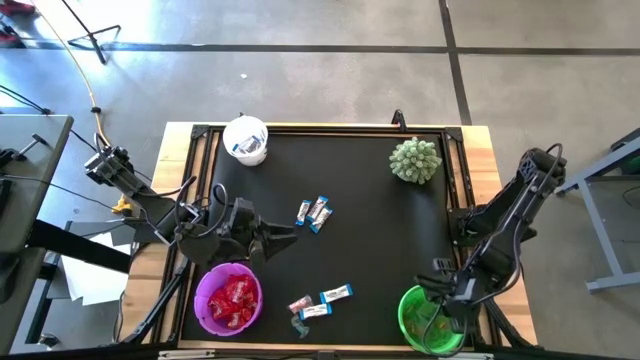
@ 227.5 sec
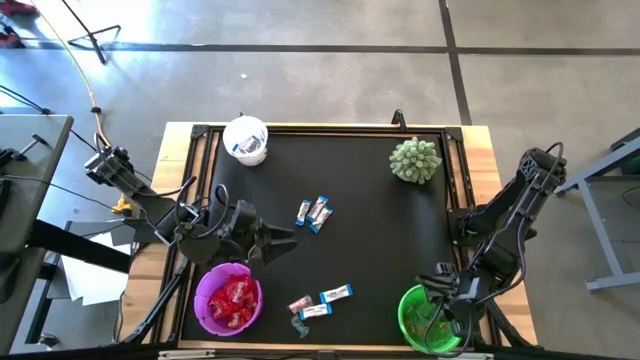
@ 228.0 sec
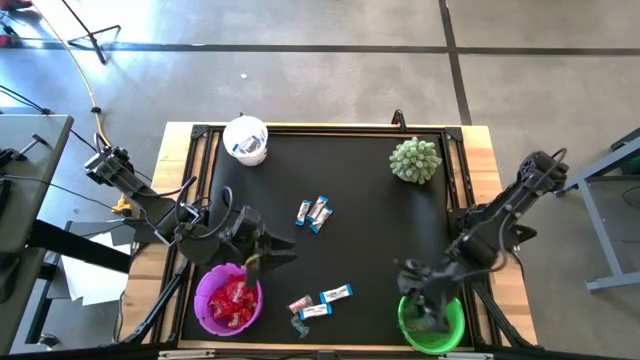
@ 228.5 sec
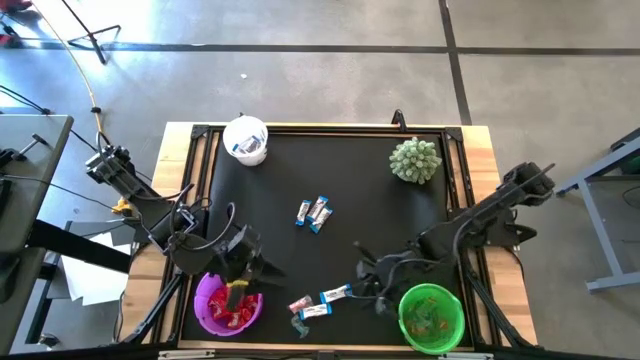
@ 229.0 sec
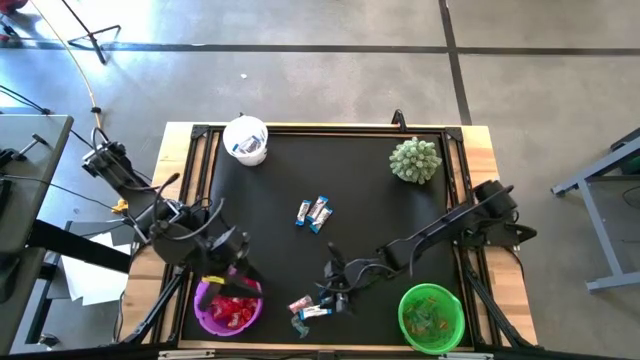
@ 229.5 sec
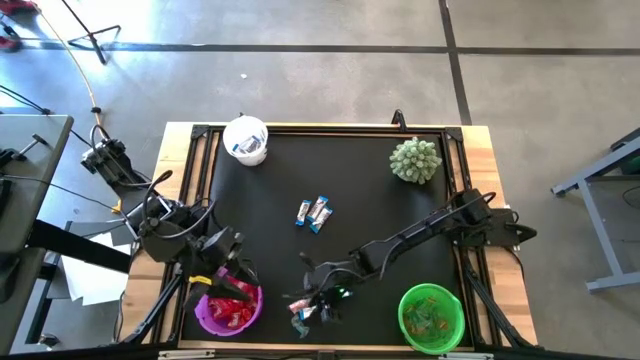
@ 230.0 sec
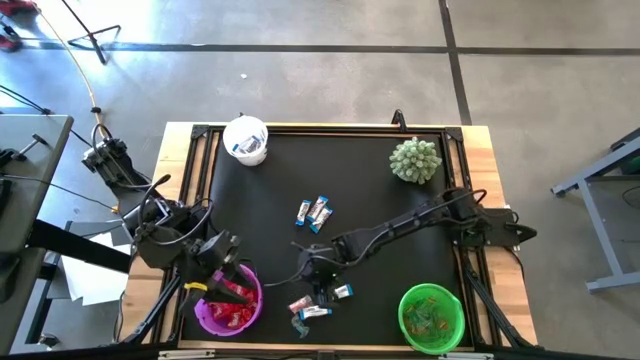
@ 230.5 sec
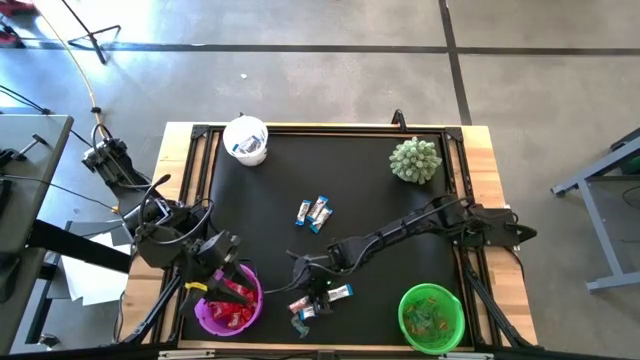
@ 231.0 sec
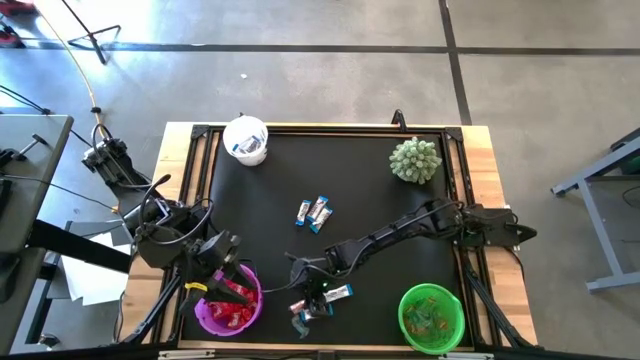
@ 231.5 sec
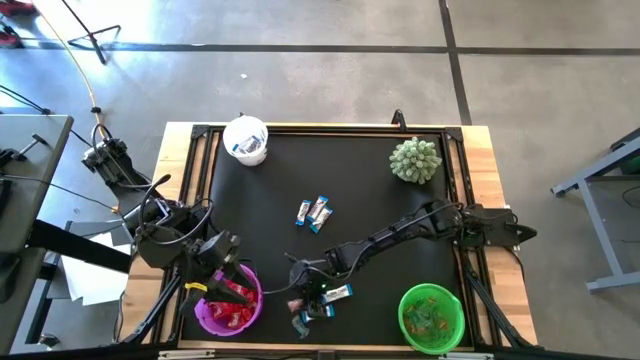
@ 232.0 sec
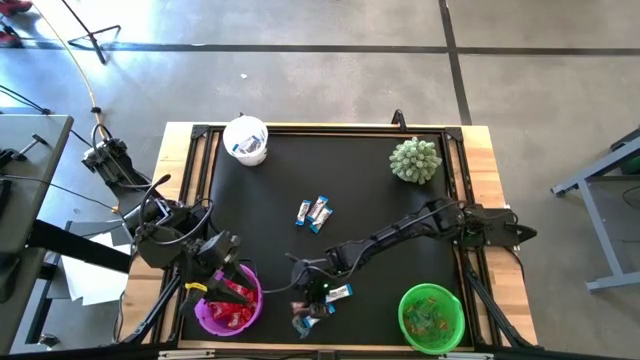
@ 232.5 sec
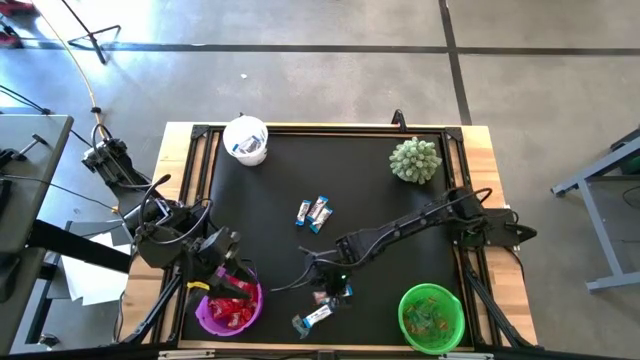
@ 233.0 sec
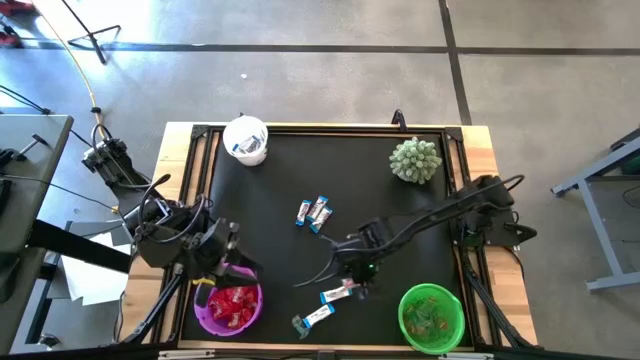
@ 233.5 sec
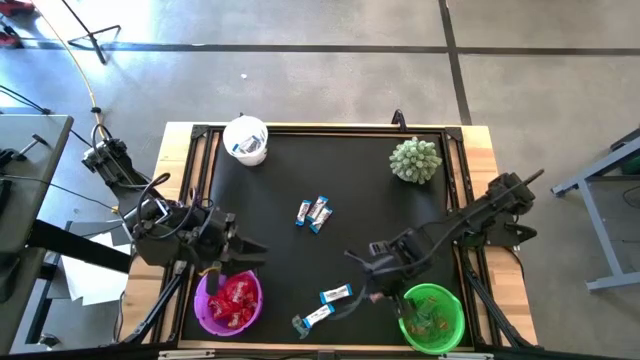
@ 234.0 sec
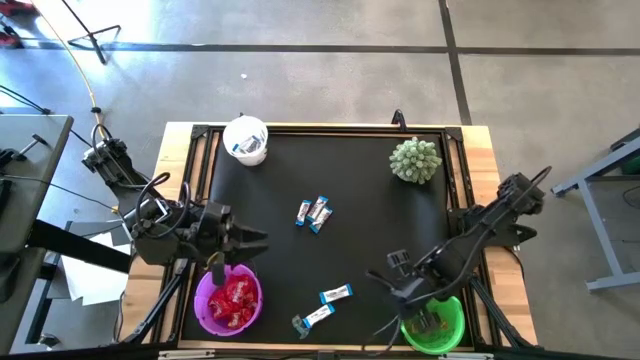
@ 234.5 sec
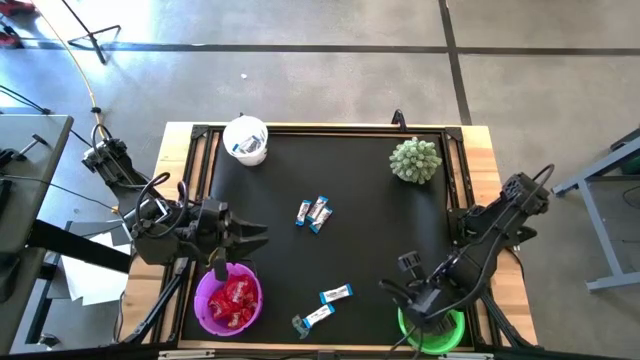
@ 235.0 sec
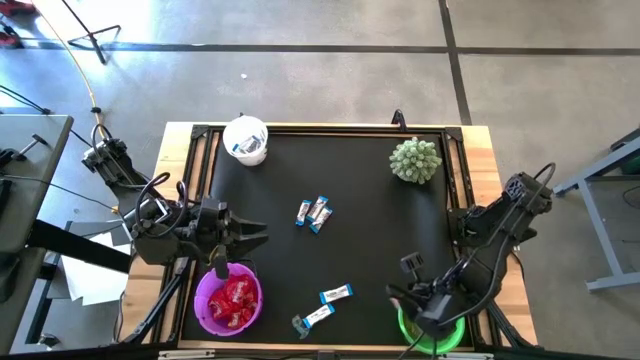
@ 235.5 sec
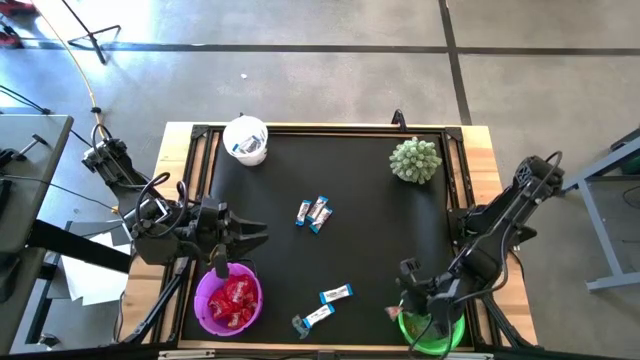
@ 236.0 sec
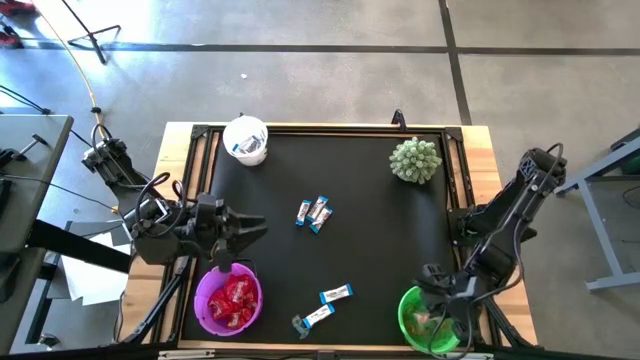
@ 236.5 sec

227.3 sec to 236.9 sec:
Task: Sort candy
Put the orange gummy into the green bucket

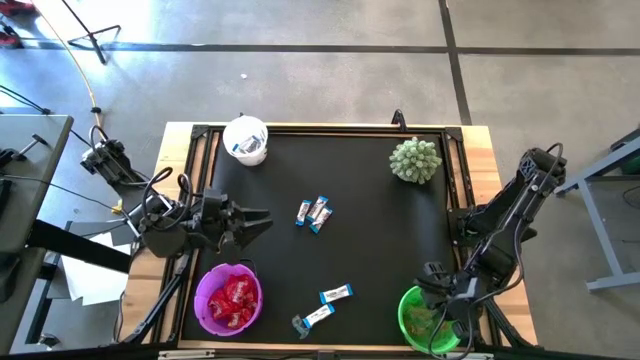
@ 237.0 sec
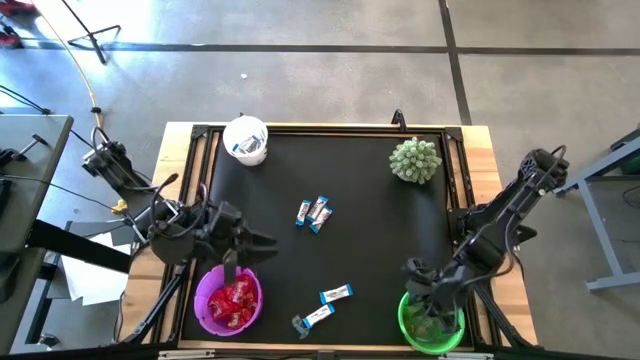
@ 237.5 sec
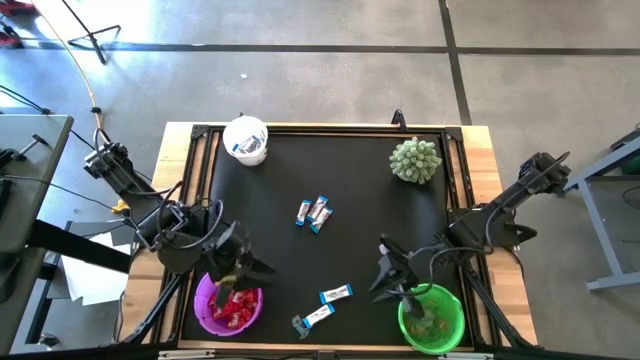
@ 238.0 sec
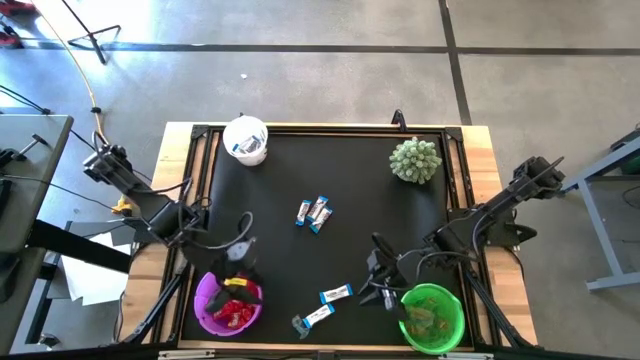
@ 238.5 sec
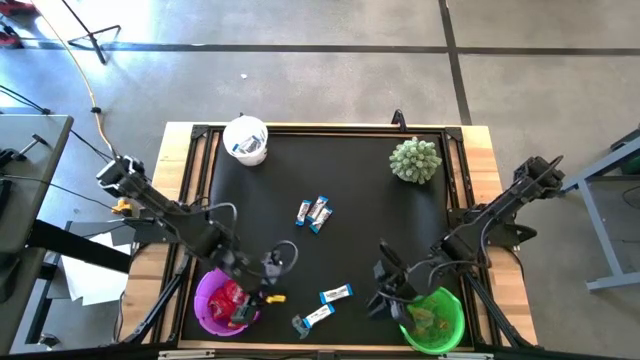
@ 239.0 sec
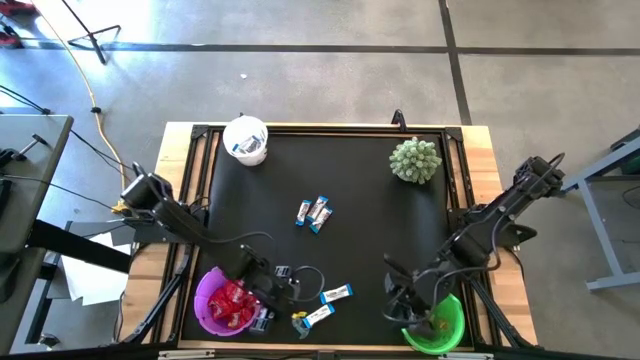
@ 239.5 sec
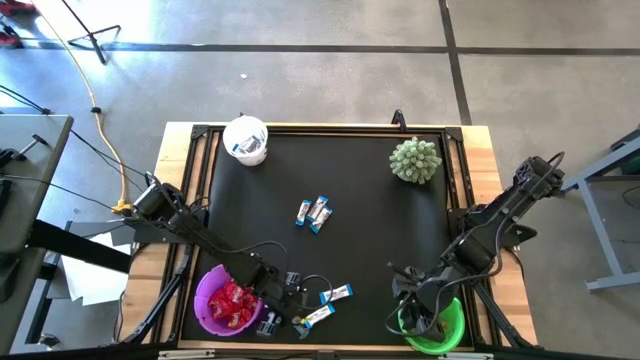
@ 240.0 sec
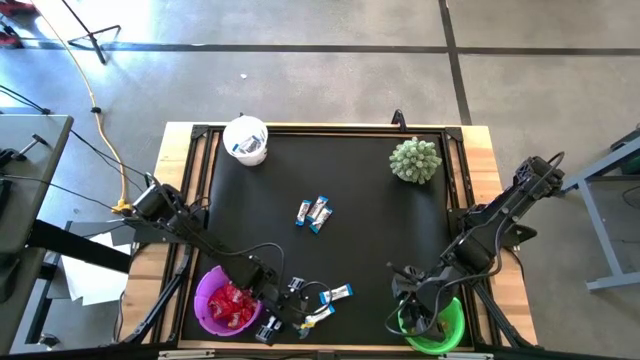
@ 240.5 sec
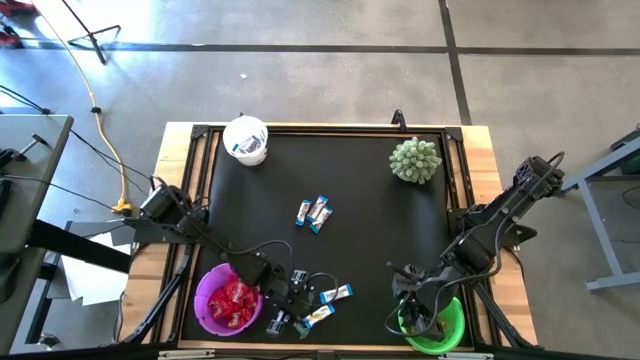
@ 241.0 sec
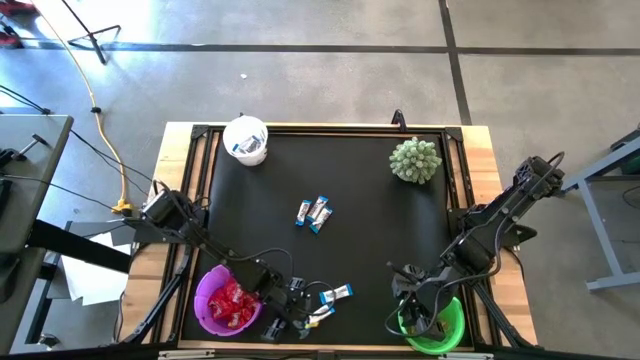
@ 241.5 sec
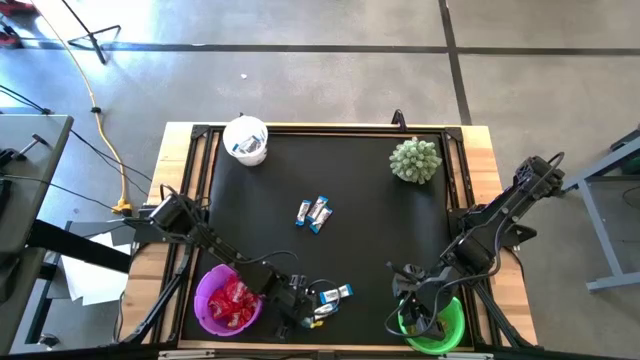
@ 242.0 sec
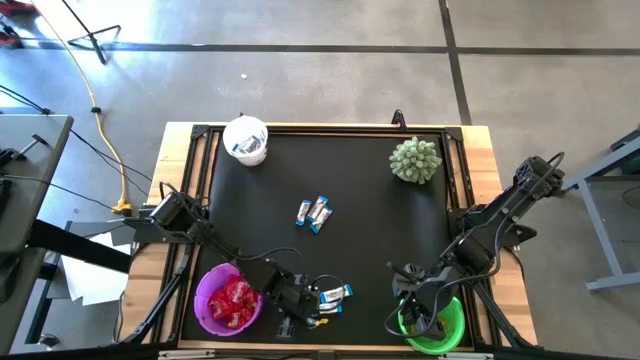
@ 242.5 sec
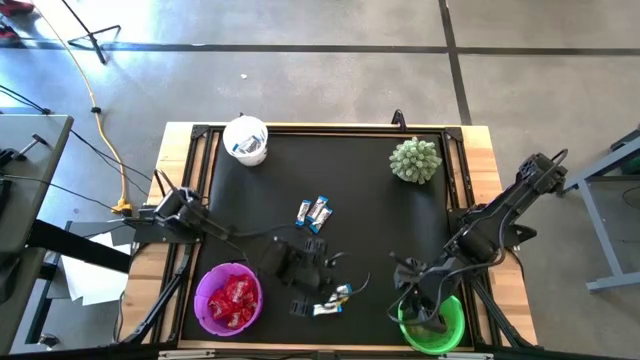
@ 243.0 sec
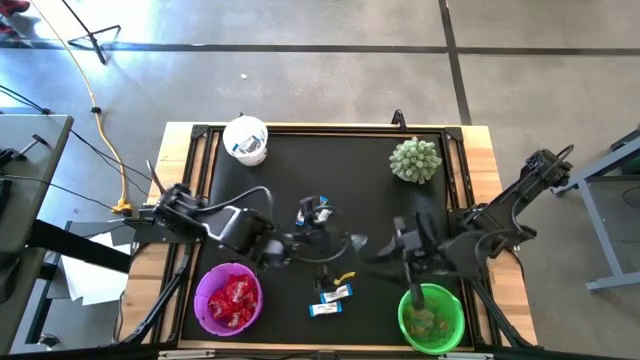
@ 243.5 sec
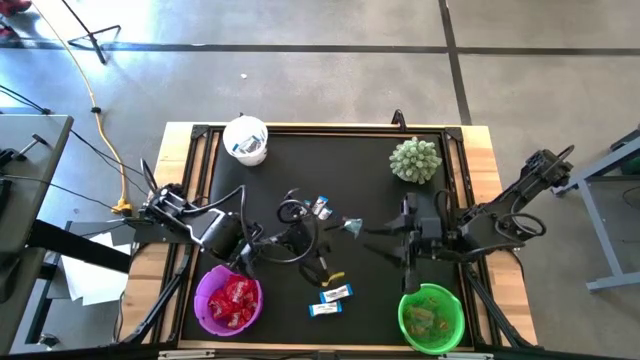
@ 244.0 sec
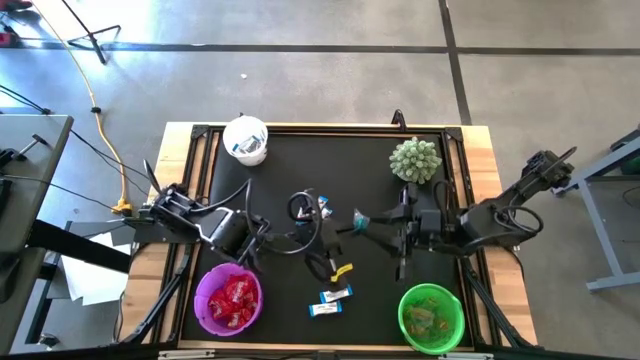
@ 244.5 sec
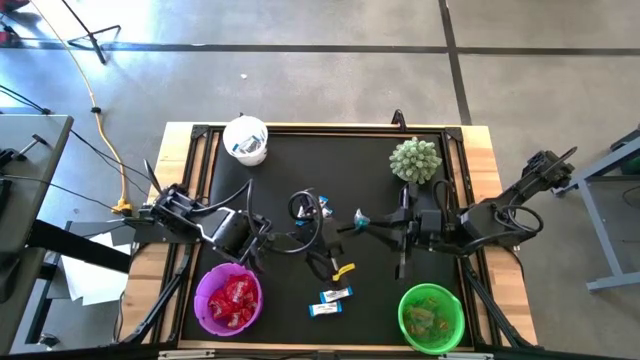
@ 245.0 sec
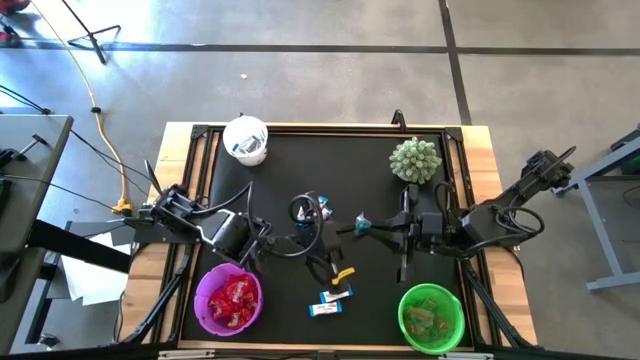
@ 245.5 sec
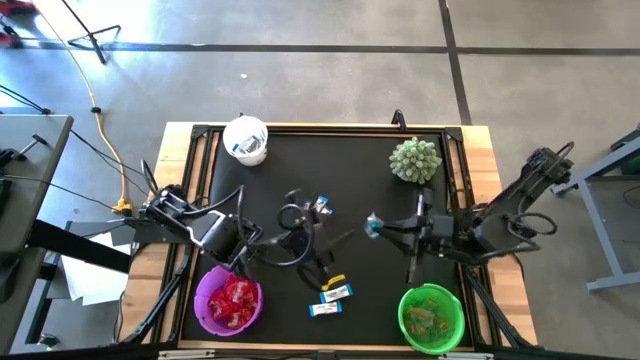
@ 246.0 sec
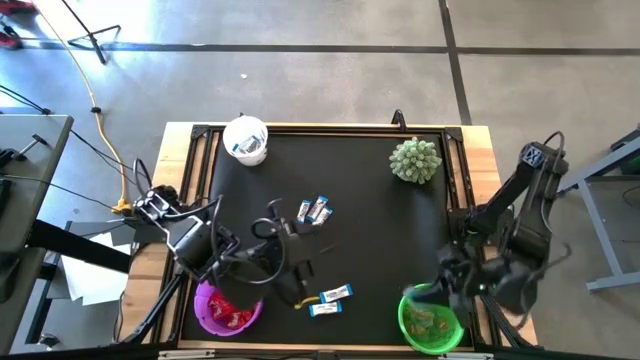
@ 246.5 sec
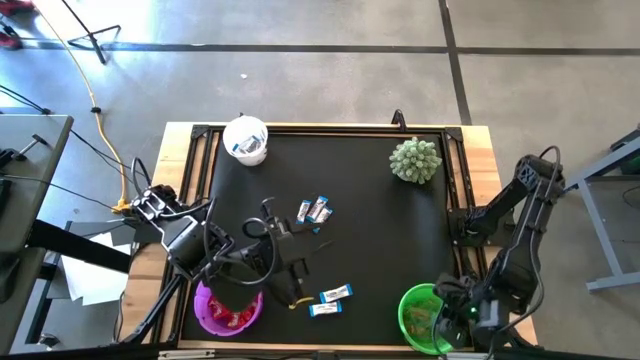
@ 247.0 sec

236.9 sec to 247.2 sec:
Put the blue gummy into the green bucket
